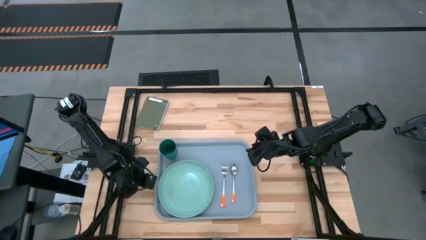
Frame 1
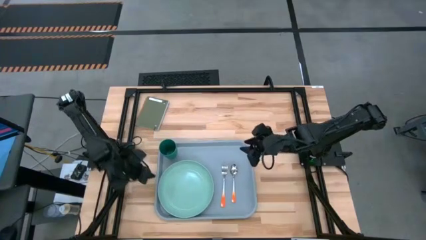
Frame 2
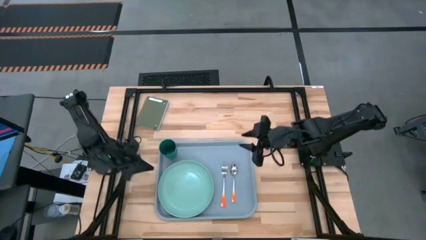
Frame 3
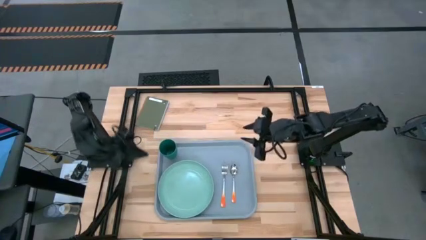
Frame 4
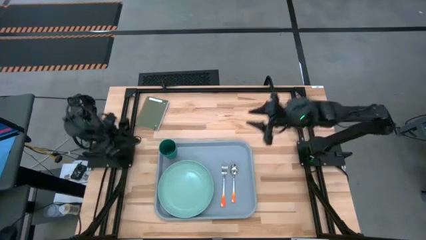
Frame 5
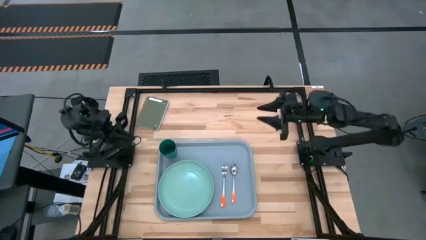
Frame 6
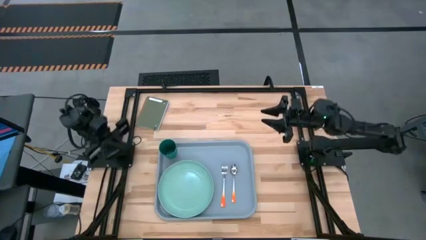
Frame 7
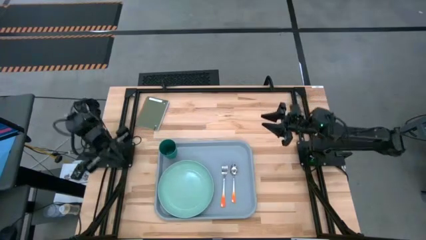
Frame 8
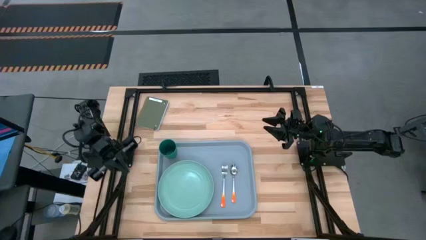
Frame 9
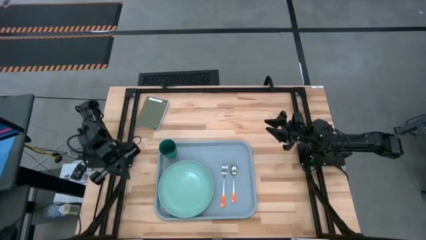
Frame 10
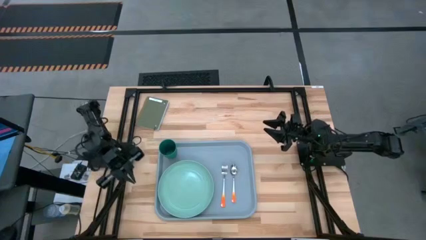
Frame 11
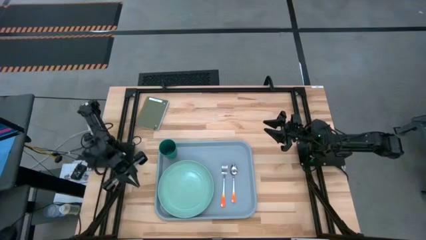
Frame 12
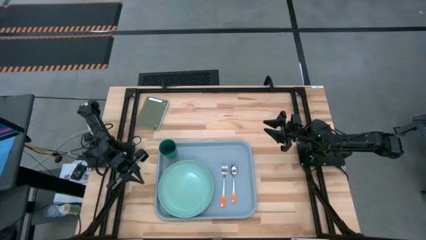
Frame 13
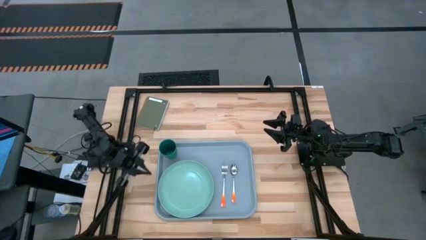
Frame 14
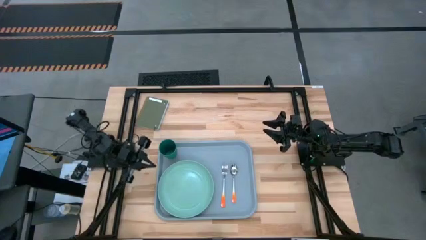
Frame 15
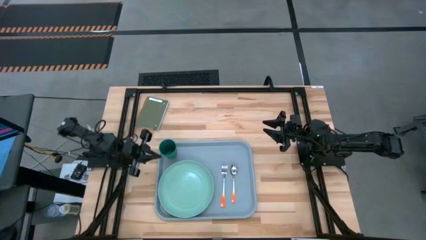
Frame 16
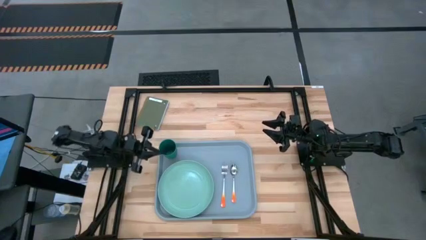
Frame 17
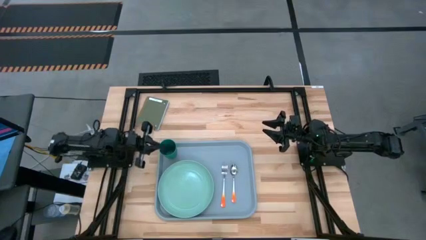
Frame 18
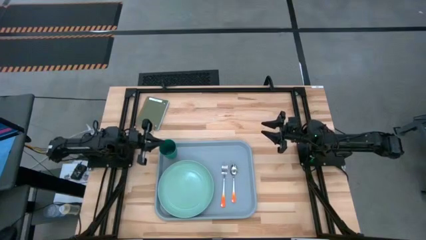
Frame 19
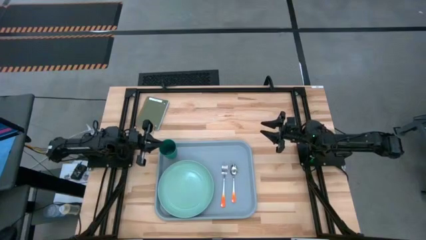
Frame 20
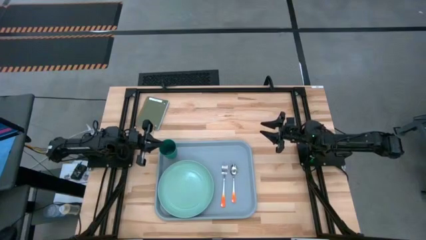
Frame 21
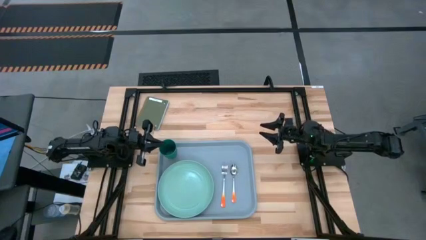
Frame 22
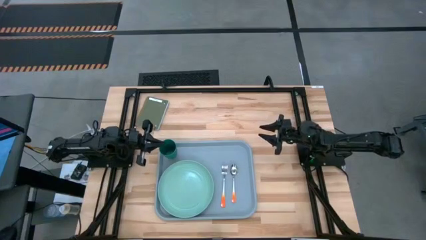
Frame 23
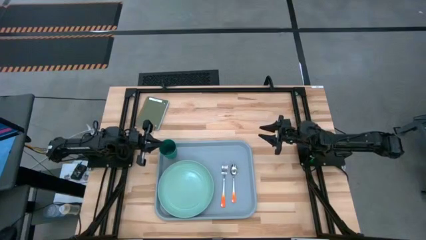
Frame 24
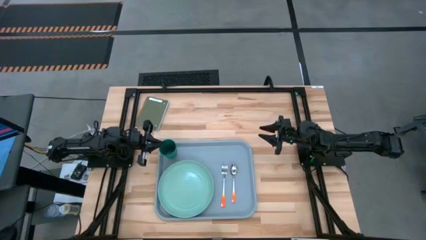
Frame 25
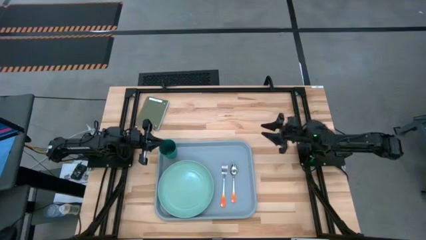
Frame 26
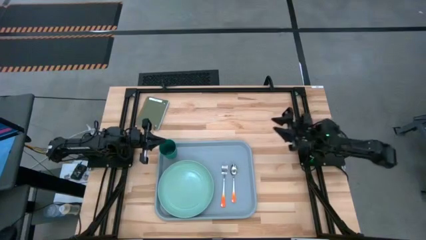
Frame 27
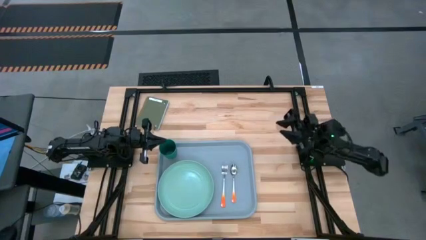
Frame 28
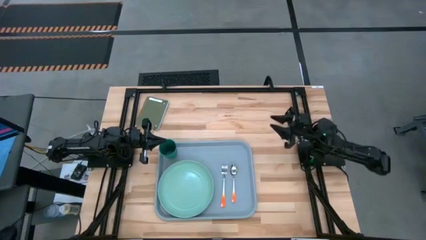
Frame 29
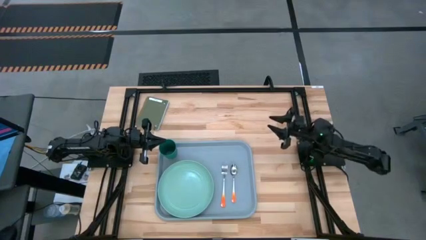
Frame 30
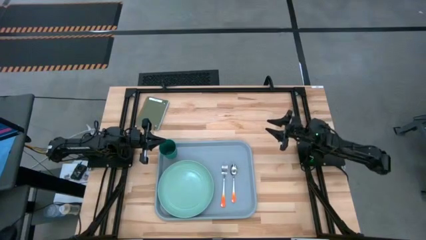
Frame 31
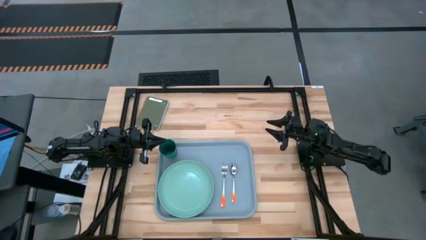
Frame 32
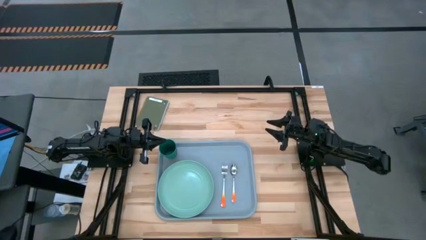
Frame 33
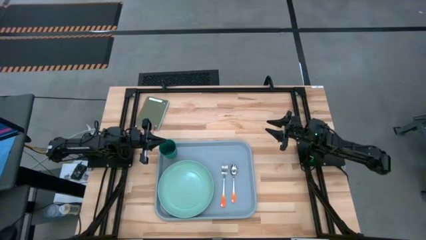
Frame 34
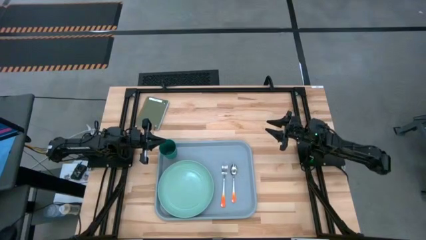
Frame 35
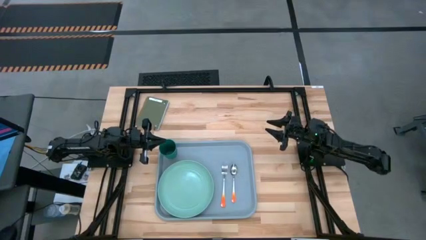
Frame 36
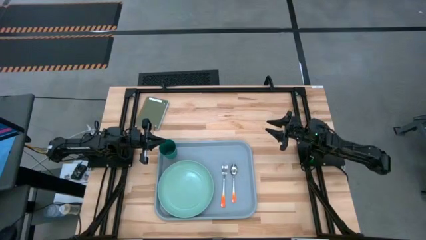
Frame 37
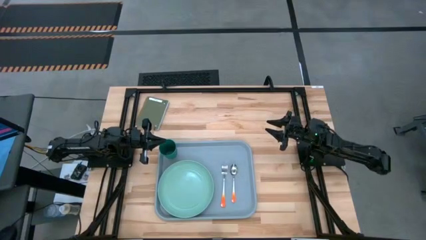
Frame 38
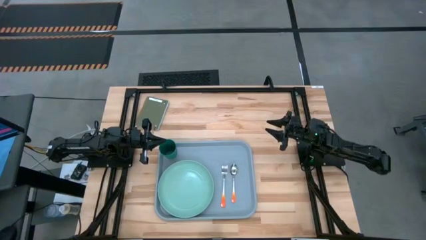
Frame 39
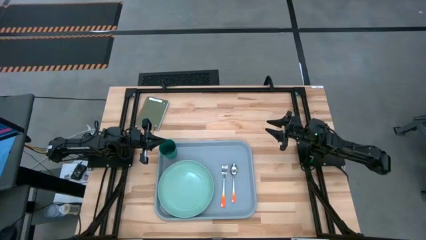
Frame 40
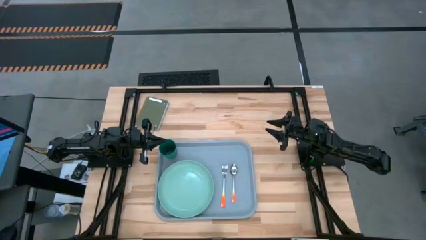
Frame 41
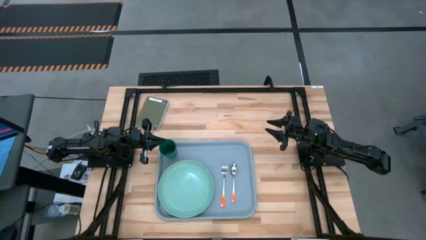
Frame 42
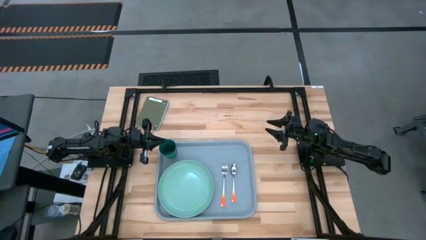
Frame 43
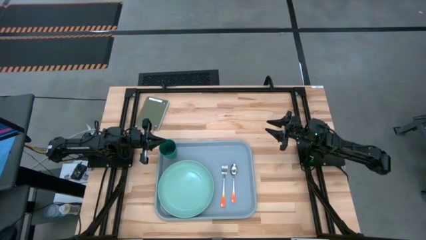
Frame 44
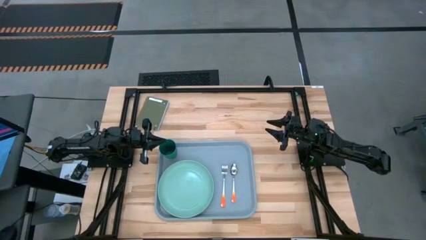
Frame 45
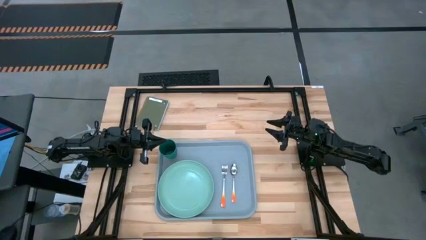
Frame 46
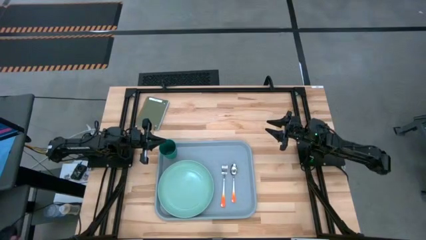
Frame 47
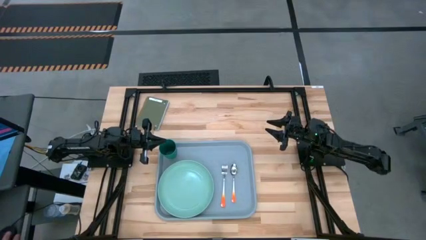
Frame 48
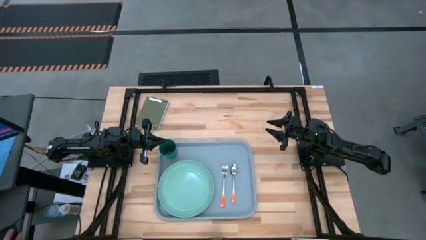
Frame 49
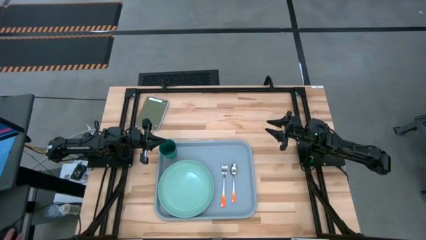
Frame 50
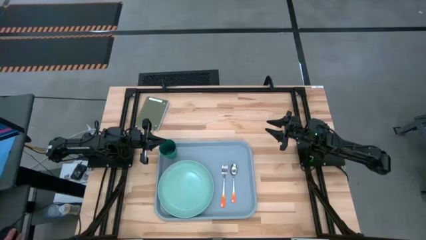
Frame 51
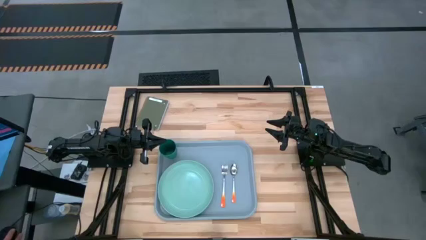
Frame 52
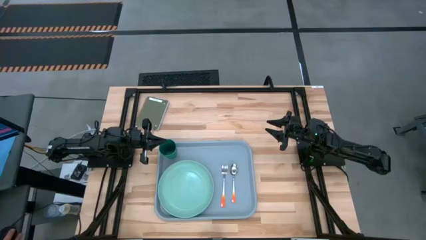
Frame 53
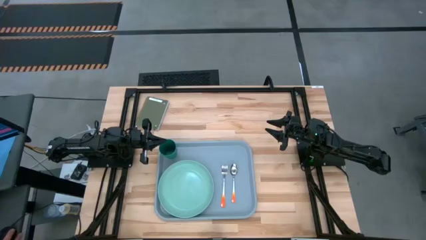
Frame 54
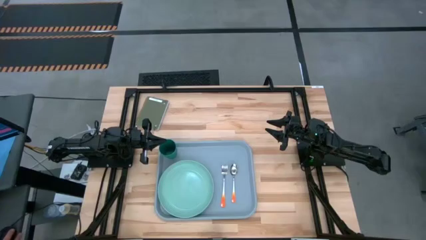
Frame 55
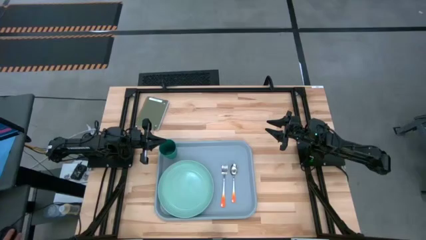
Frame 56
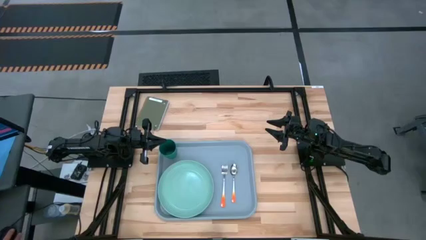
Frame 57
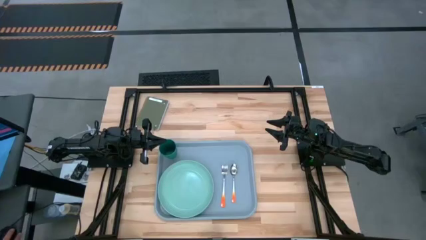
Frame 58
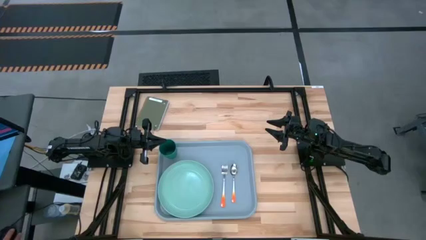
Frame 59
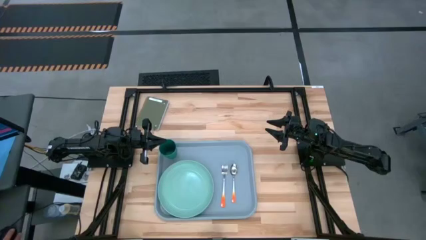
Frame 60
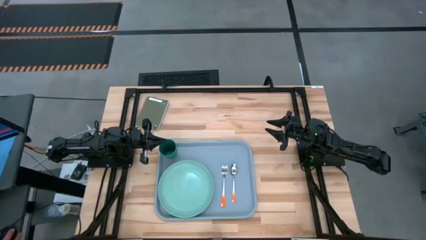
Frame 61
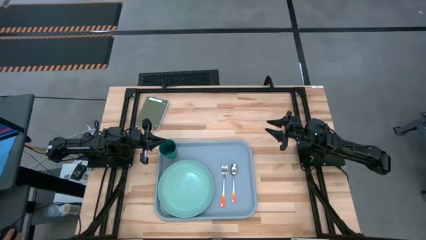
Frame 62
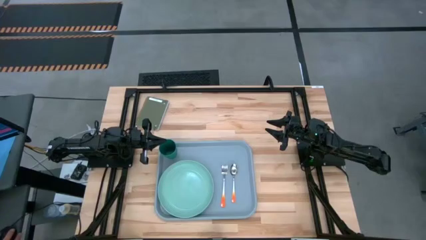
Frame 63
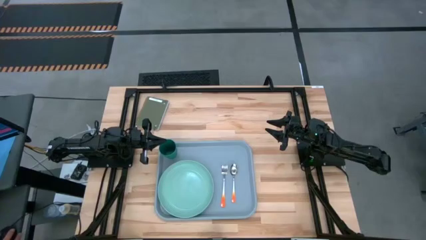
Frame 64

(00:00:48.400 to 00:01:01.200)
Task: Pick and place plate/cup/fork/spoon on tray
Return to Home Position

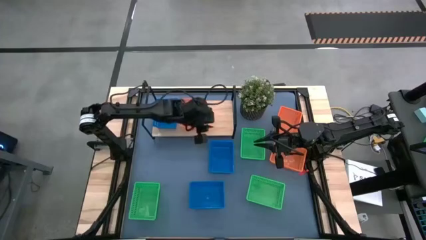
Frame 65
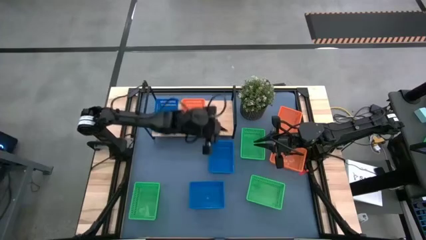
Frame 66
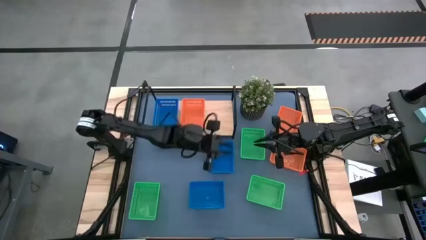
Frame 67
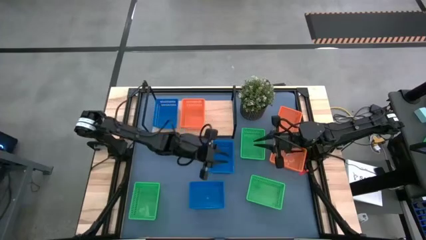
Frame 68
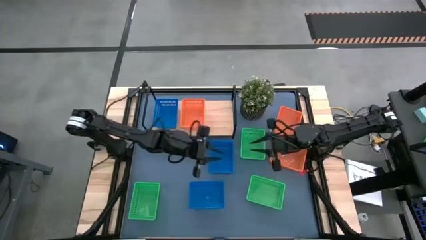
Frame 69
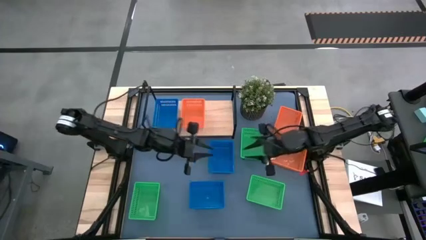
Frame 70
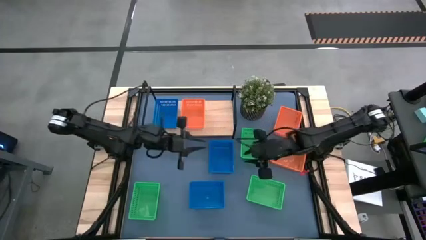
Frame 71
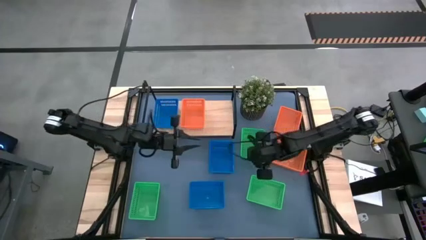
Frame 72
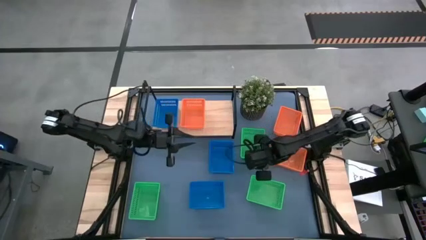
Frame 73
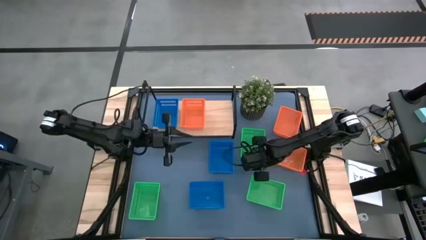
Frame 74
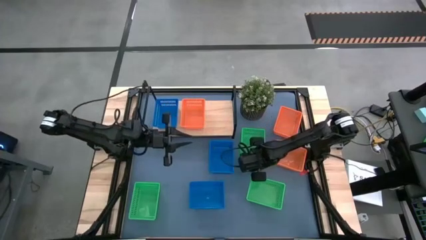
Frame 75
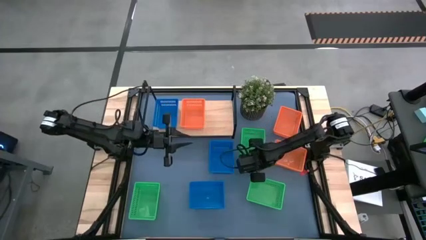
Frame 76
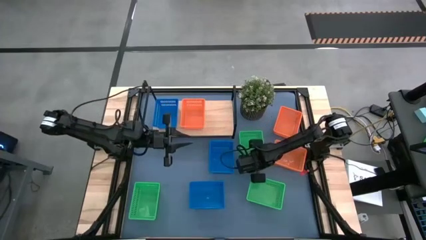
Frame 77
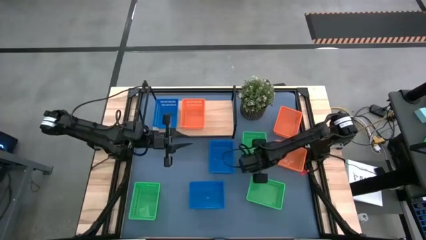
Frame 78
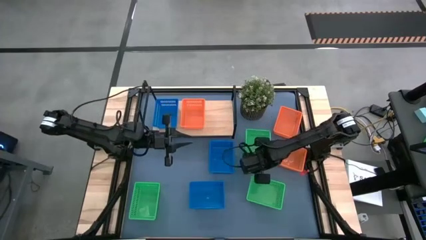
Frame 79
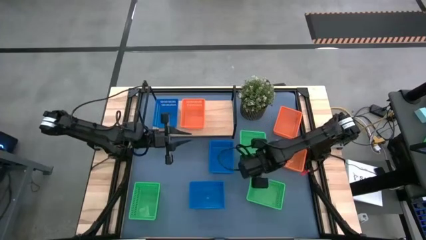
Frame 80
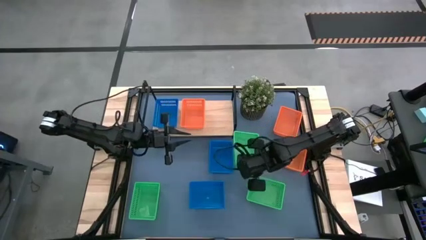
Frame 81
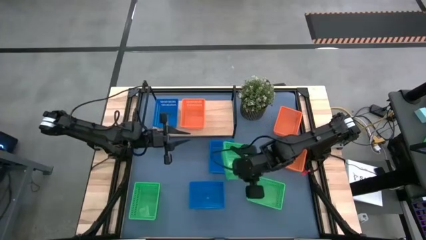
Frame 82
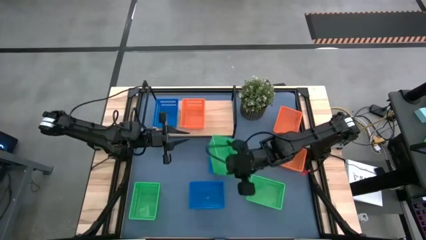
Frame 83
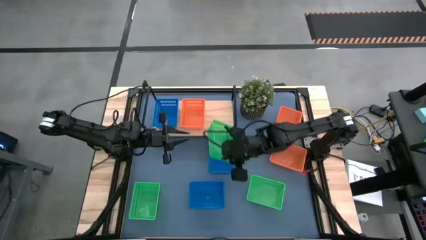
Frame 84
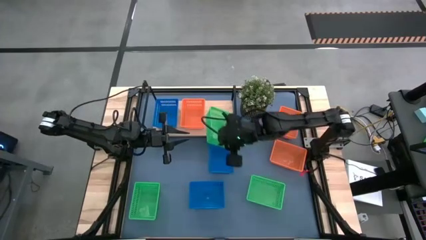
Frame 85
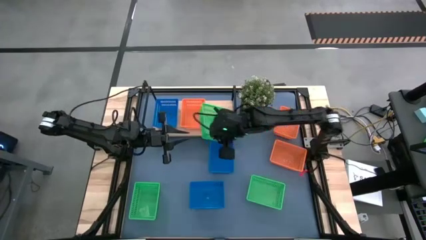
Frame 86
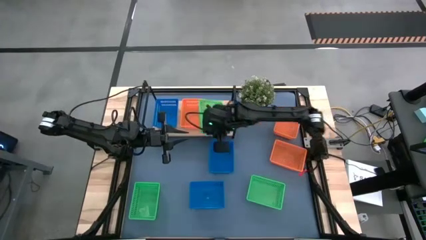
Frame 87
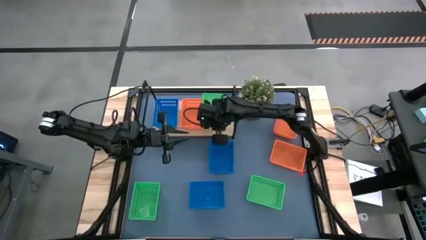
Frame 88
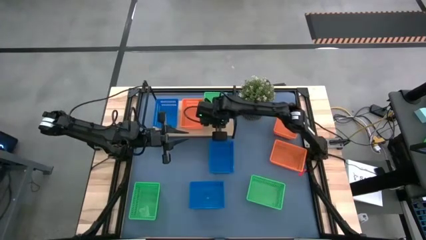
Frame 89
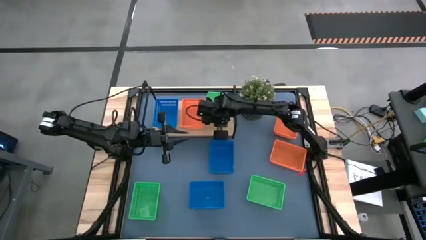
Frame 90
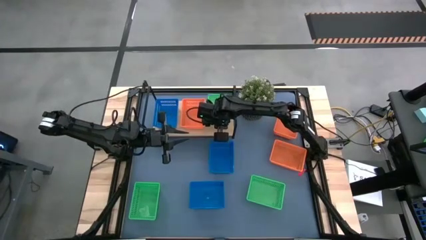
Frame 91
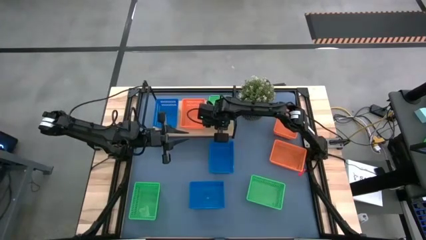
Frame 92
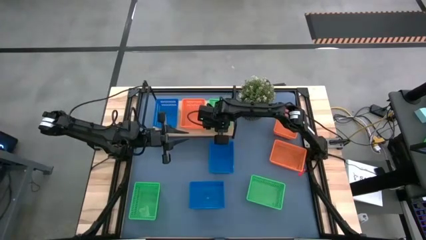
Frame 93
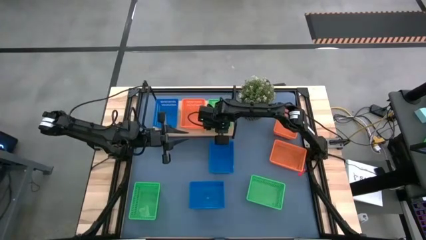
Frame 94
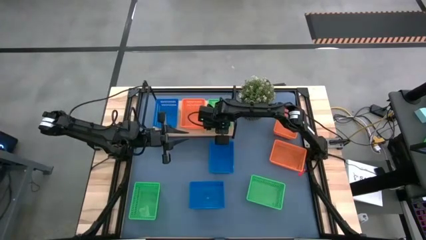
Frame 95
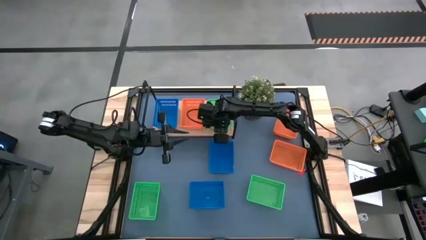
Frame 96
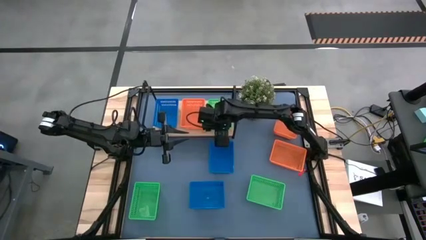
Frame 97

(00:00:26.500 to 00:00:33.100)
Task: Stack baskets on shelf by color
Put the top right green bin on the shelf
